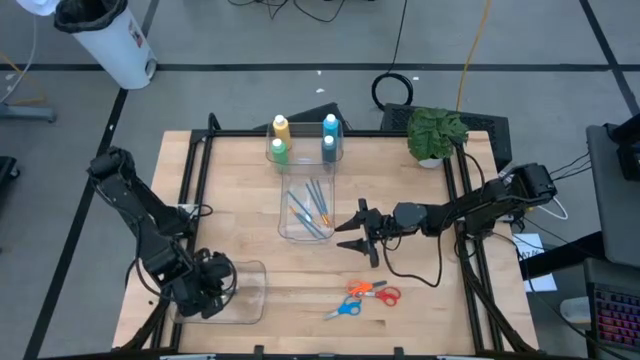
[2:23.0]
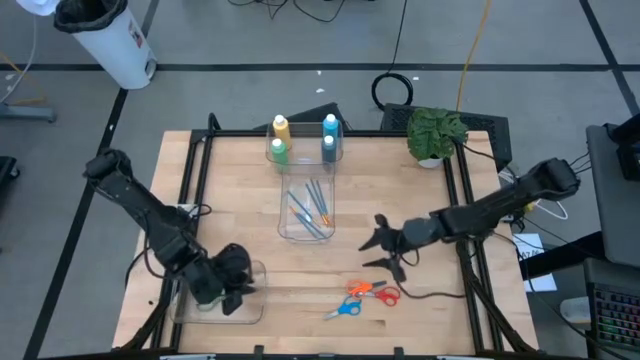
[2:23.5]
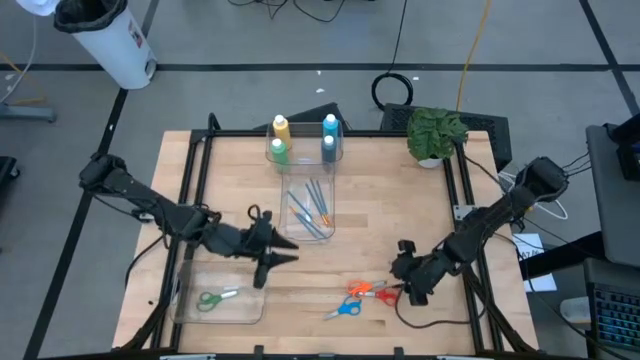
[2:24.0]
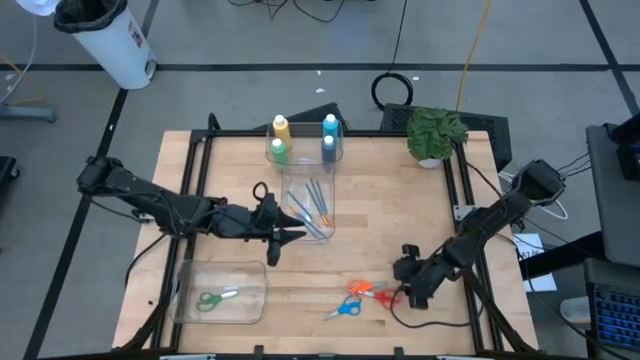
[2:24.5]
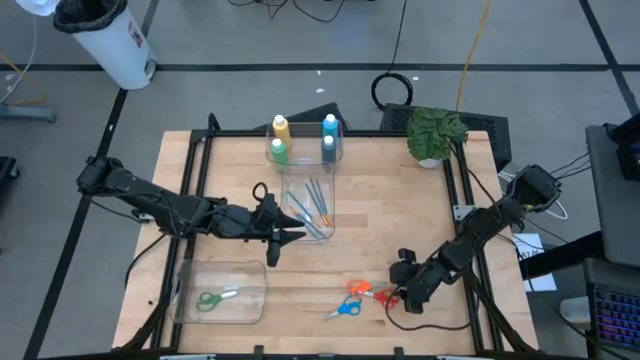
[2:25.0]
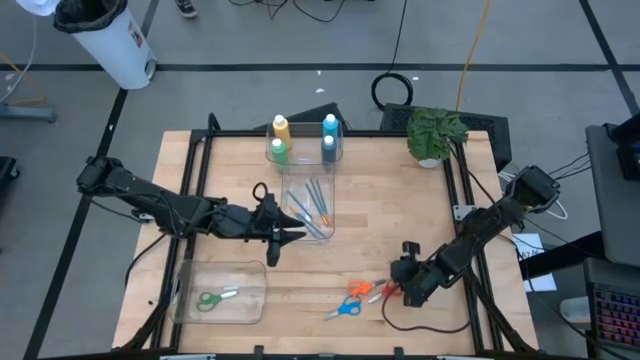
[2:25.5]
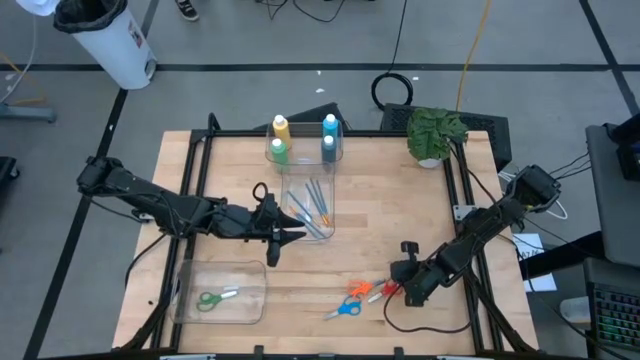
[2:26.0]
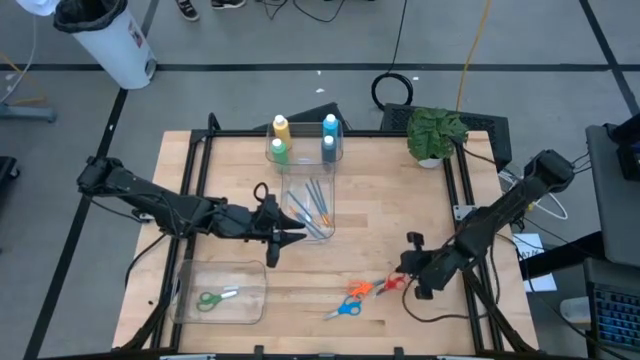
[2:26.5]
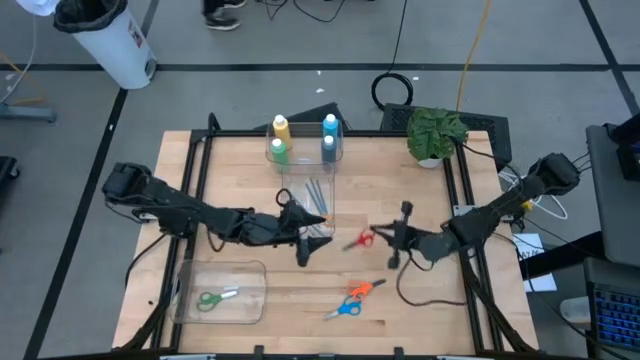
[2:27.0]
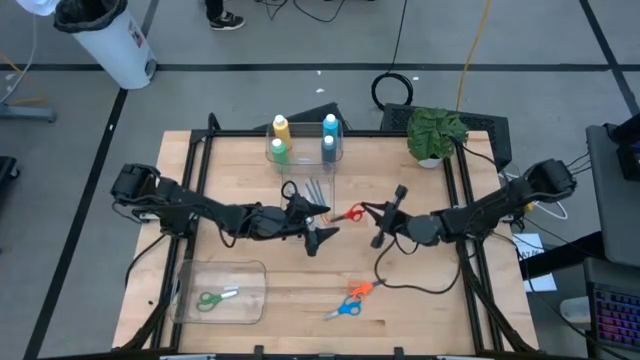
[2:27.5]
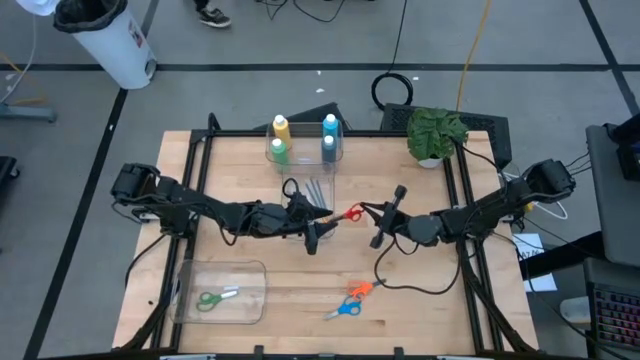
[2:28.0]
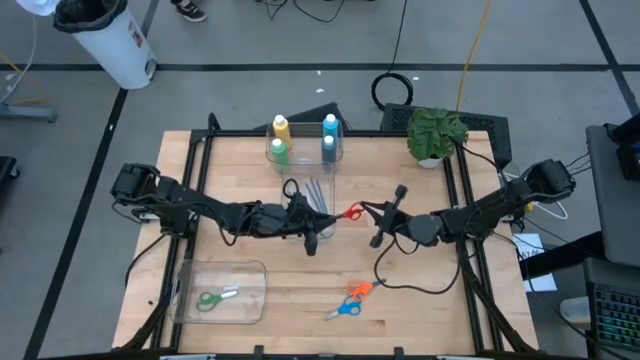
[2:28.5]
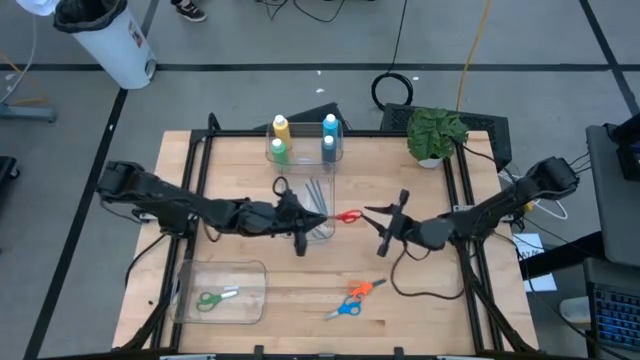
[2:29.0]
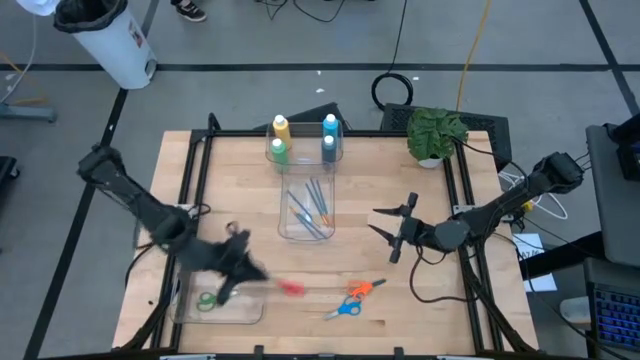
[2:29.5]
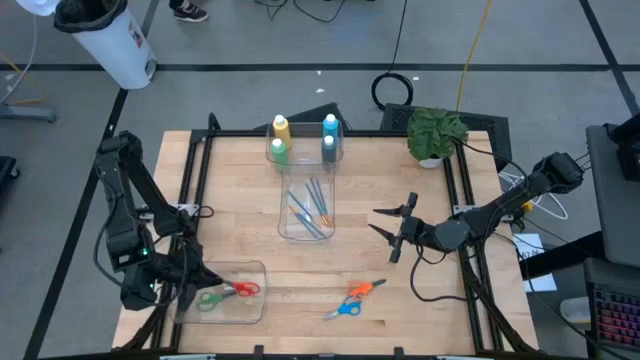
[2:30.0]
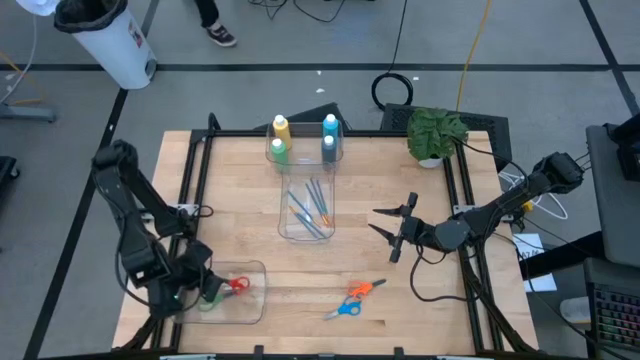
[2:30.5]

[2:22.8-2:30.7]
Task: Pick & Place Paint Supplies
Put the red scissors into the bottom transparent bin

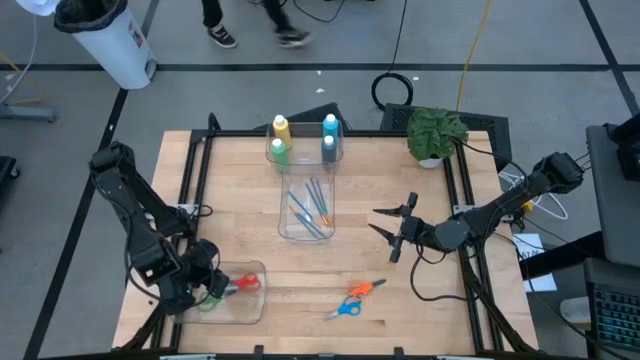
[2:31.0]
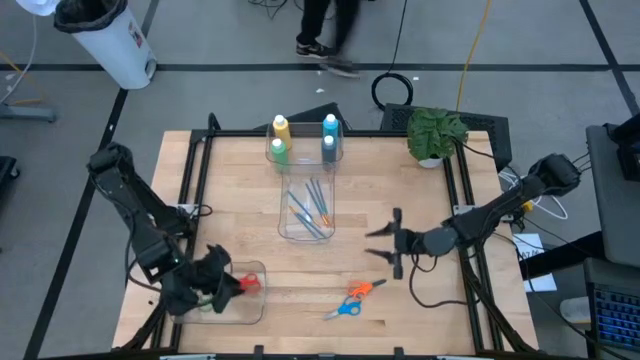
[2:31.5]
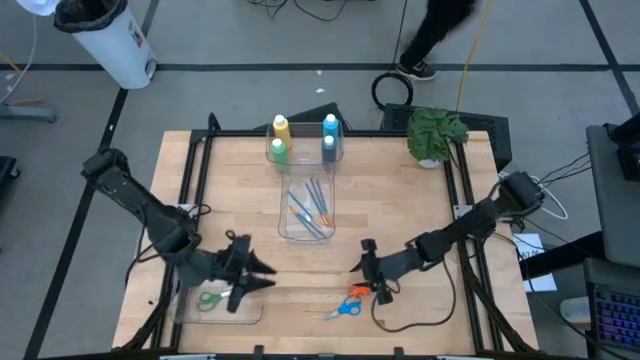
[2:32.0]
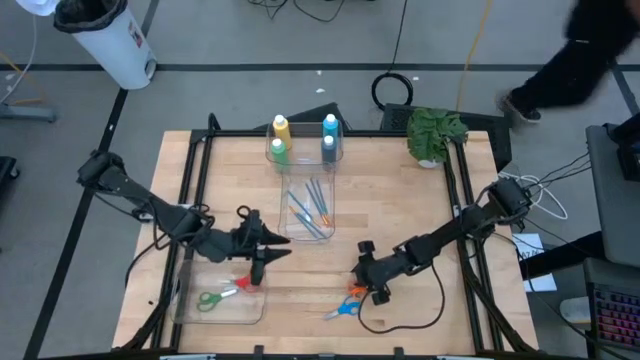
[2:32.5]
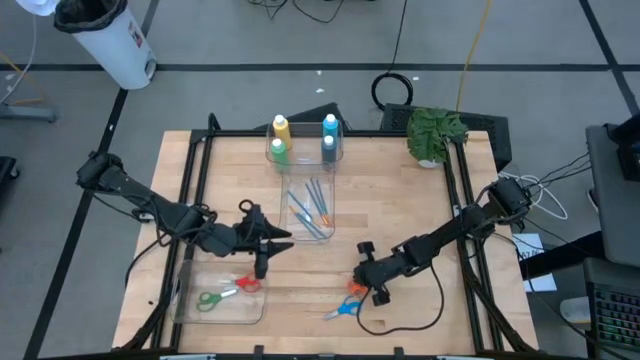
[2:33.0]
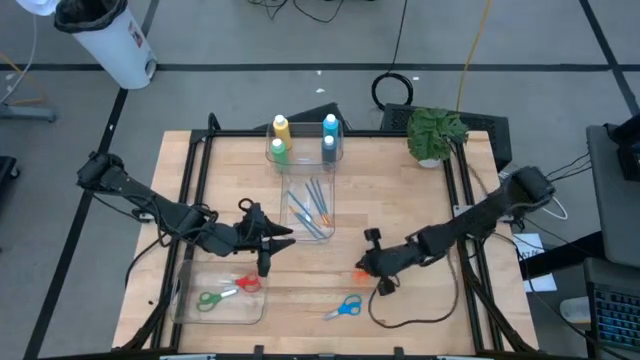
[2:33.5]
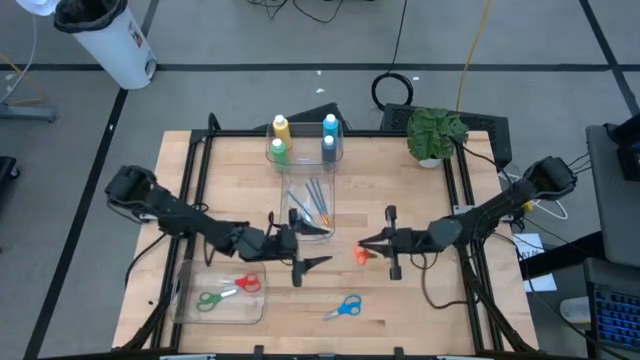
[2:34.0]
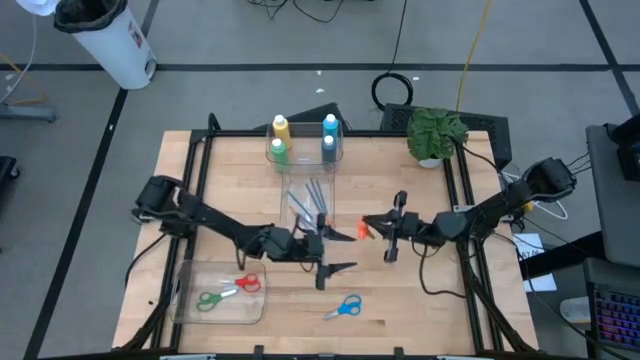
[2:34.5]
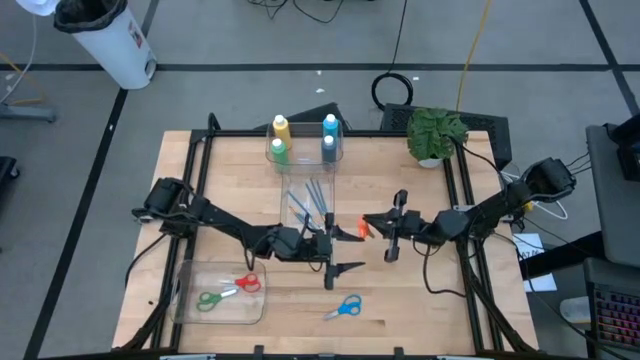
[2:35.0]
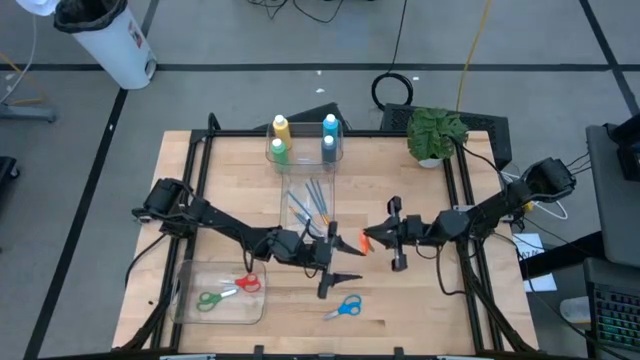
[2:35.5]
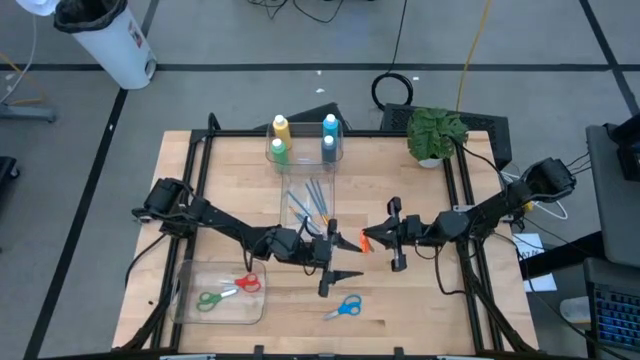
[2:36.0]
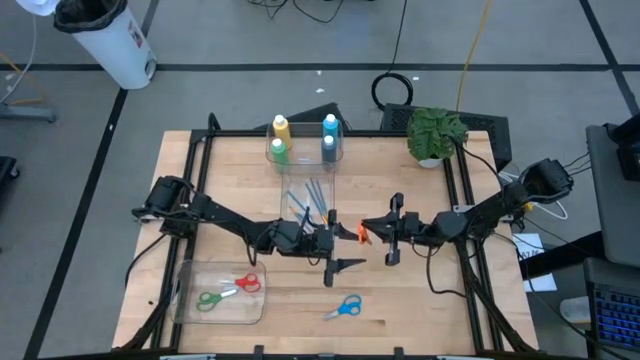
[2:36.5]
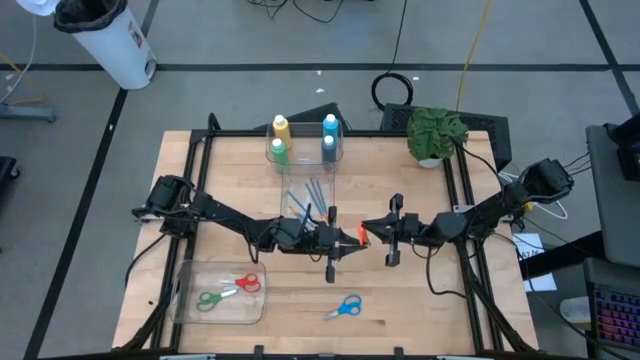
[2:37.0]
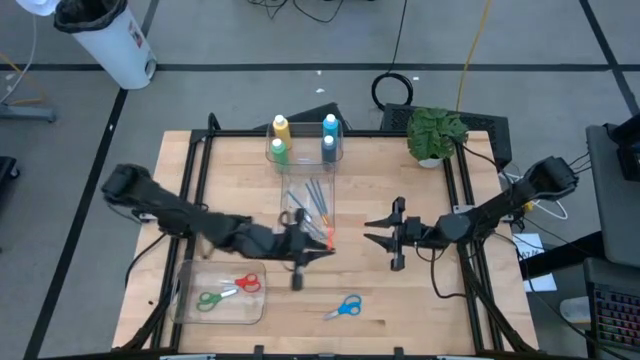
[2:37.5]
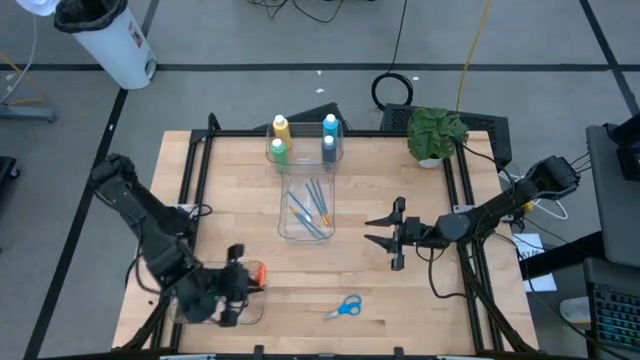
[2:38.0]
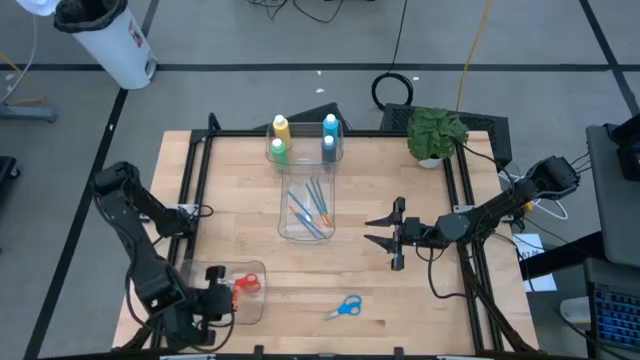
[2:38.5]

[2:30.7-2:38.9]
Put the orange scissors into the bottom transparent bin

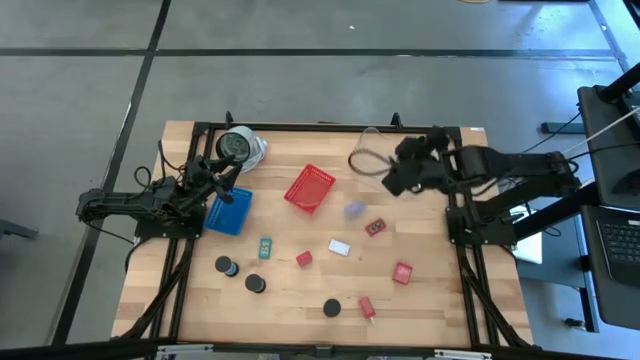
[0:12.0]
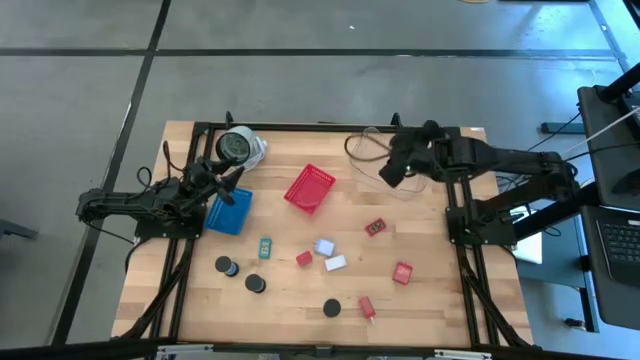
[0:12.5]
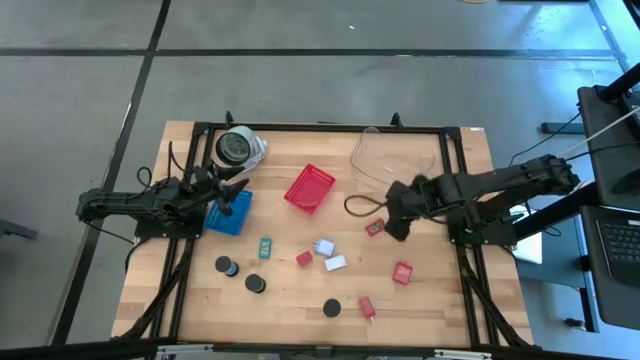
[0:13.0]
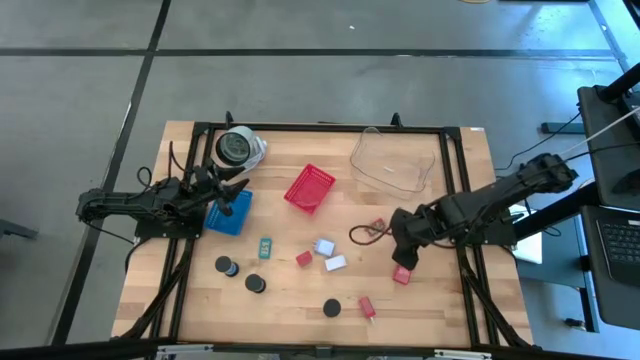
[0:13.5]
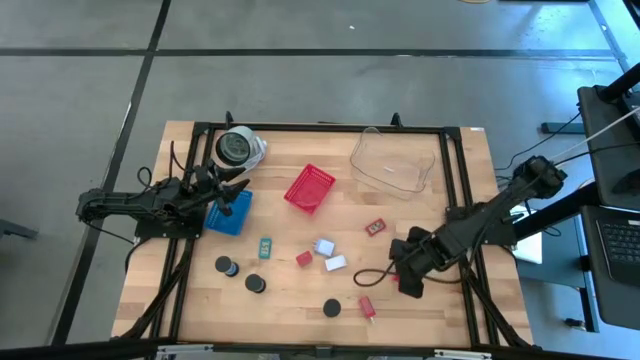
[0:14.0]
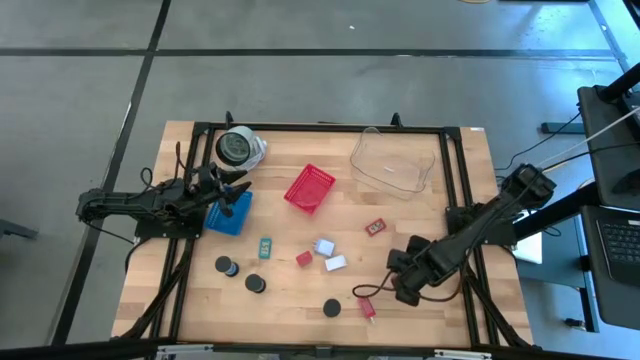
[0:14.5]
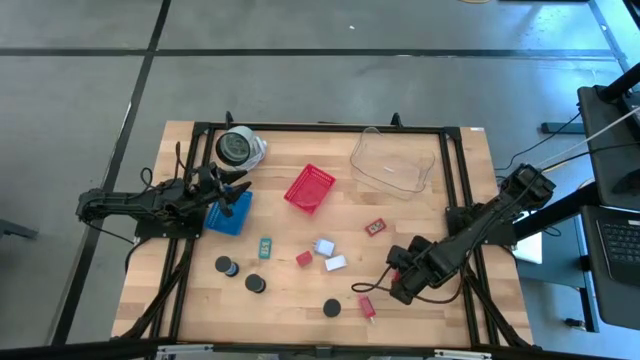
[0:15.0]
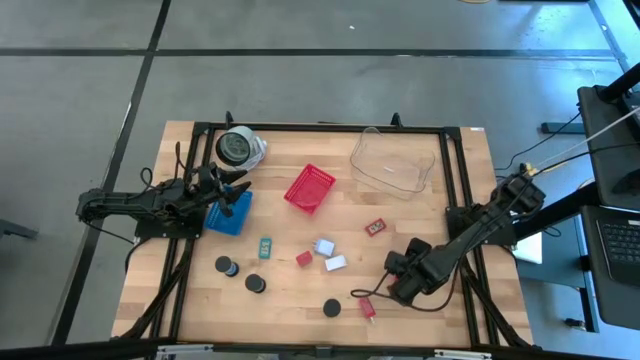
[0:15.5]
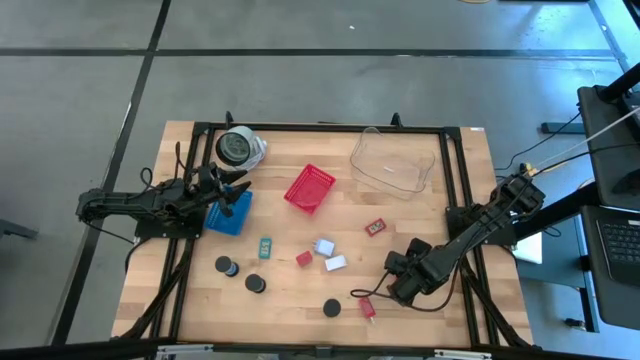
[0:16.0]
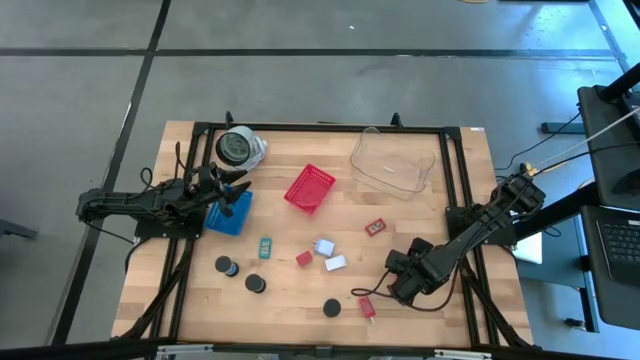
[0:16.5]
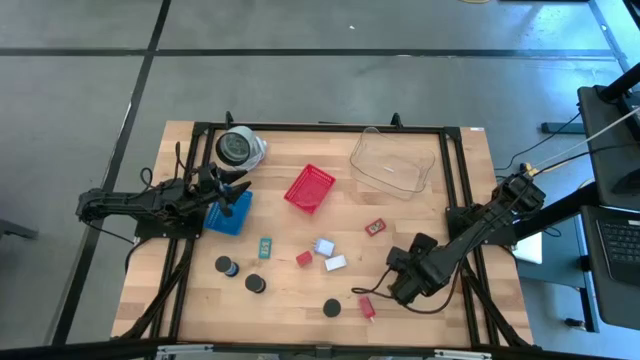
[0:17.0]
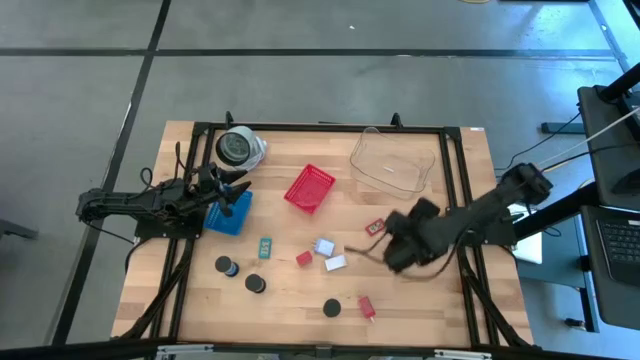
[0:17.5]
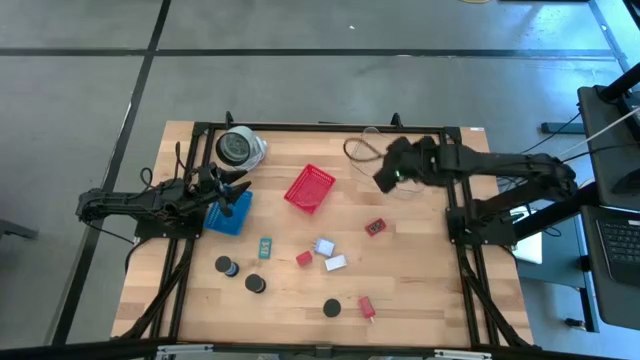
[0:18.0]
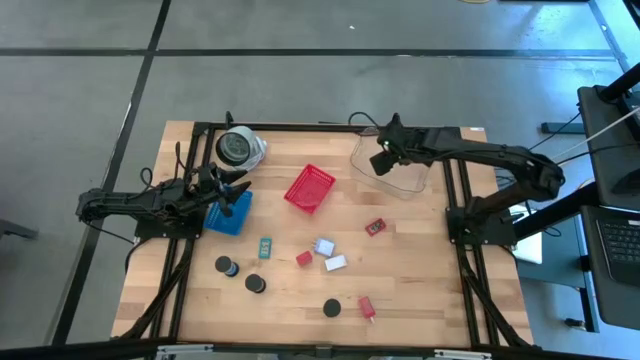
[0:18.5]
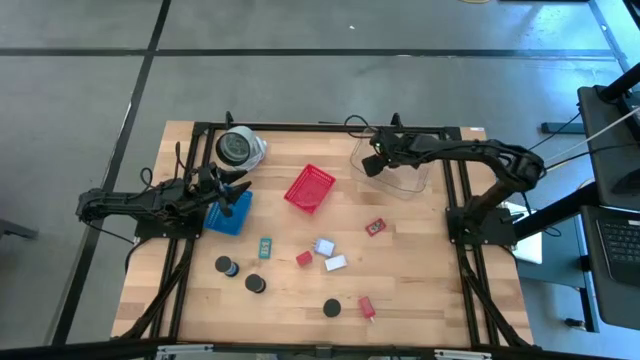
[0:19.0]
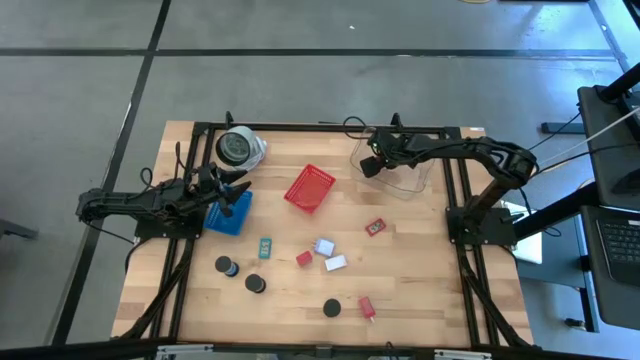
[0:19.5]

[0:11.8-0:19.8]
Task: Pick & Place Office items
Put the top right red charger adapter into the white bin
